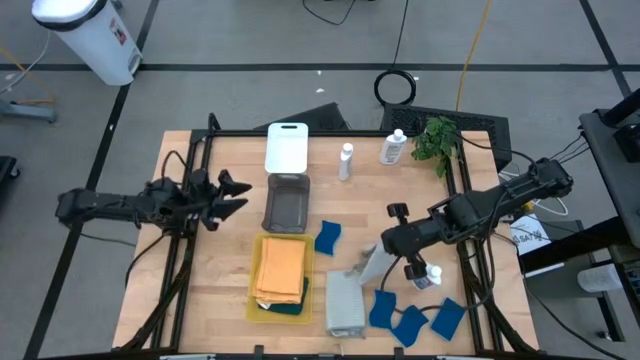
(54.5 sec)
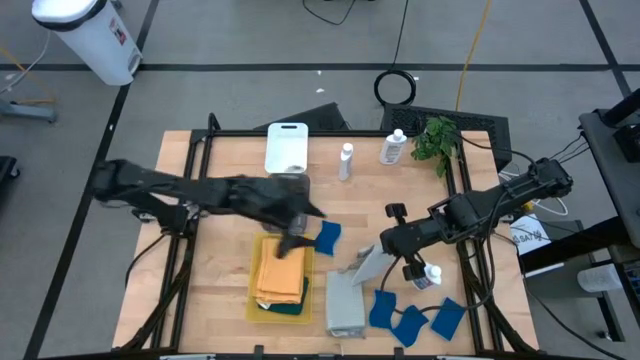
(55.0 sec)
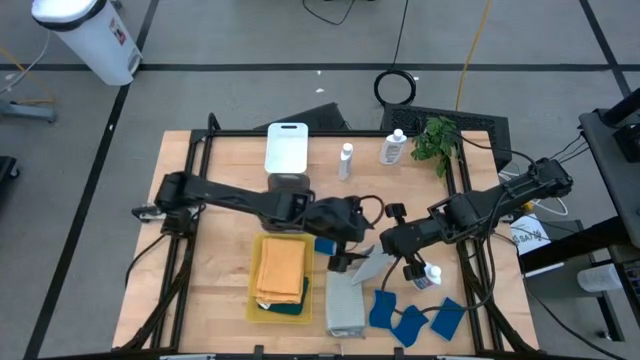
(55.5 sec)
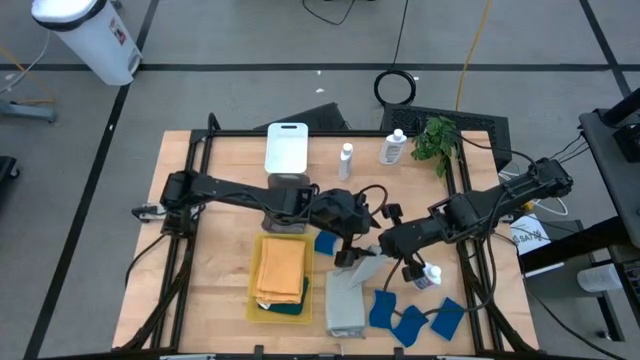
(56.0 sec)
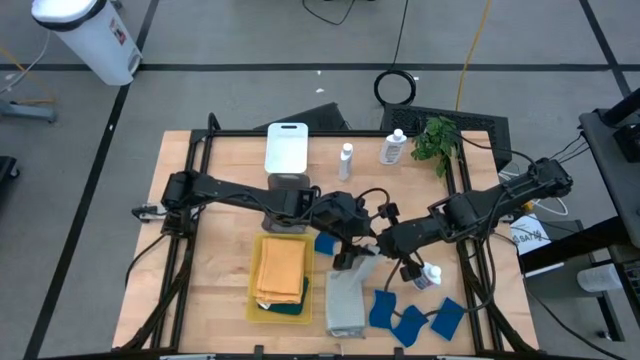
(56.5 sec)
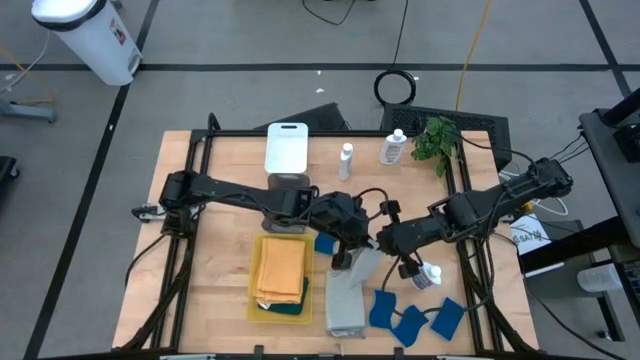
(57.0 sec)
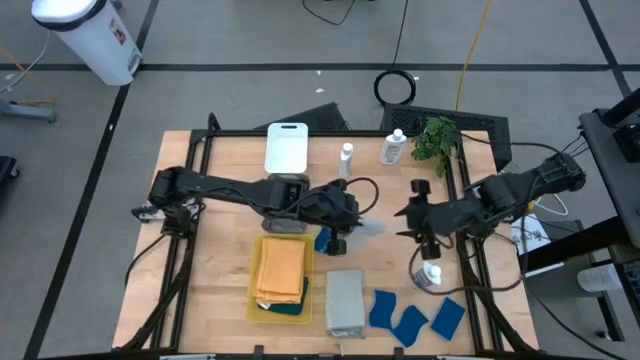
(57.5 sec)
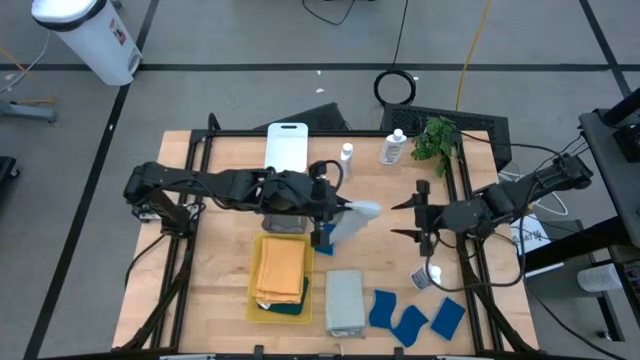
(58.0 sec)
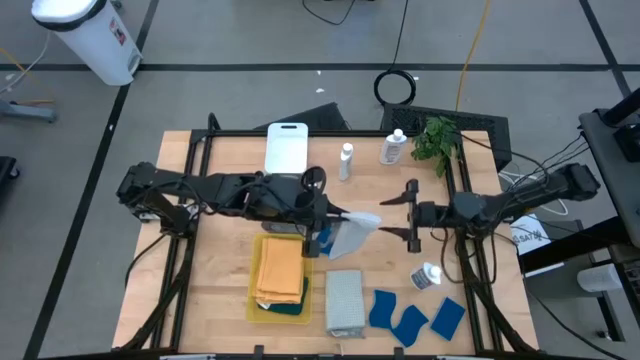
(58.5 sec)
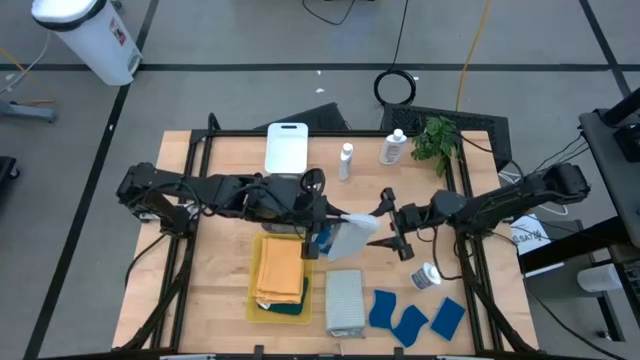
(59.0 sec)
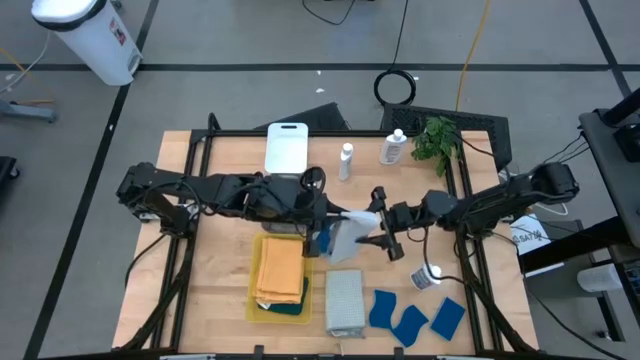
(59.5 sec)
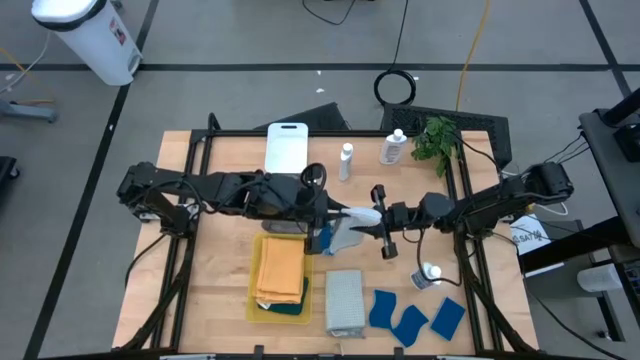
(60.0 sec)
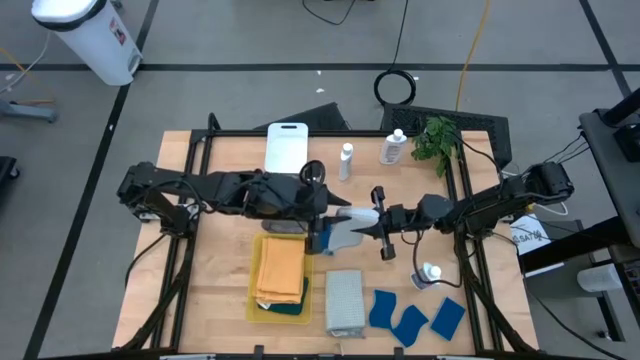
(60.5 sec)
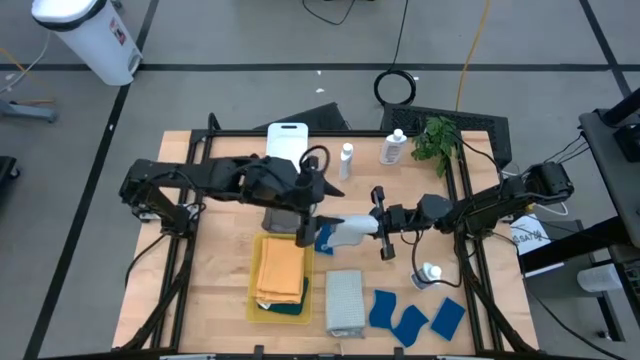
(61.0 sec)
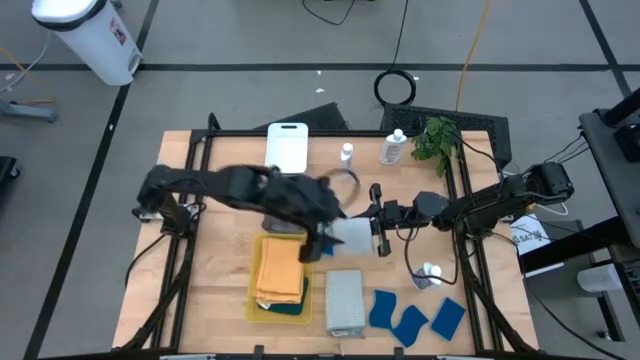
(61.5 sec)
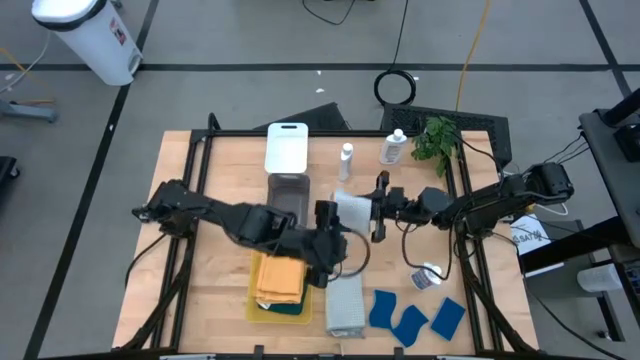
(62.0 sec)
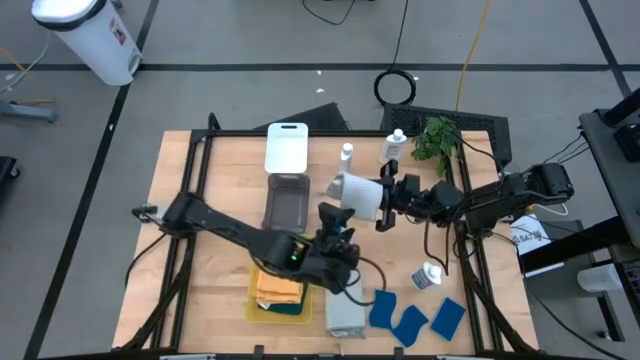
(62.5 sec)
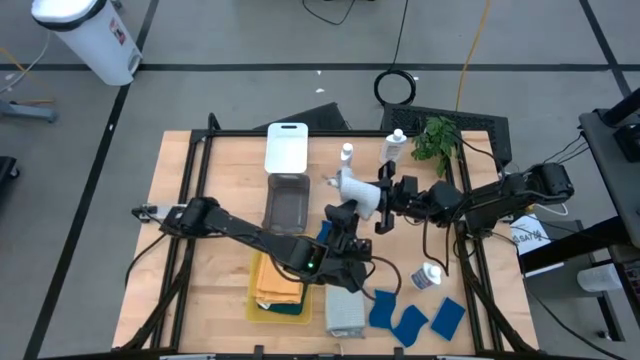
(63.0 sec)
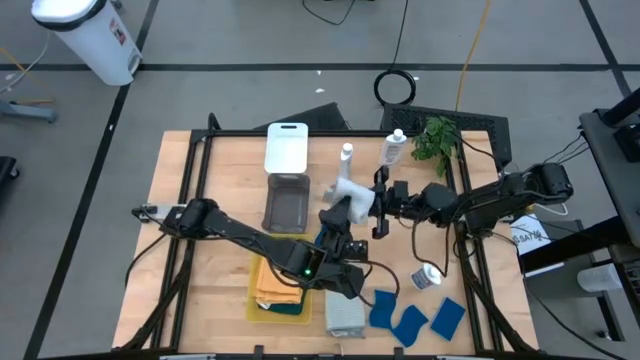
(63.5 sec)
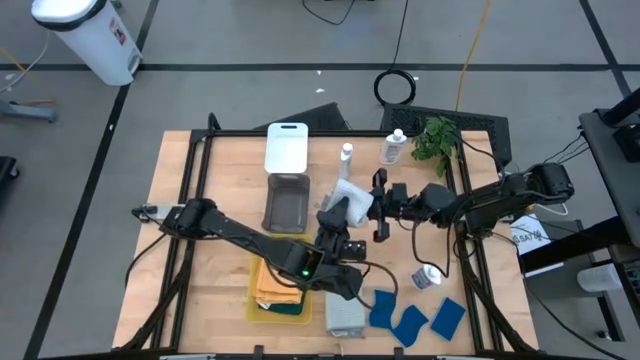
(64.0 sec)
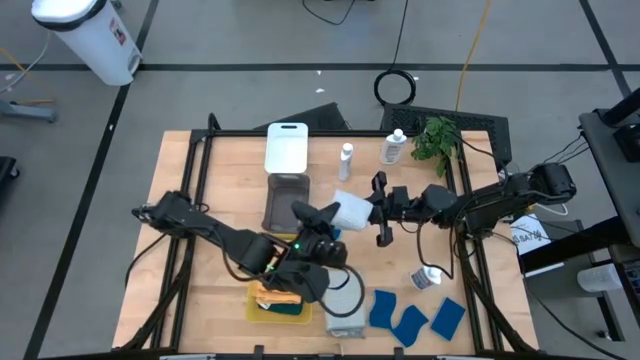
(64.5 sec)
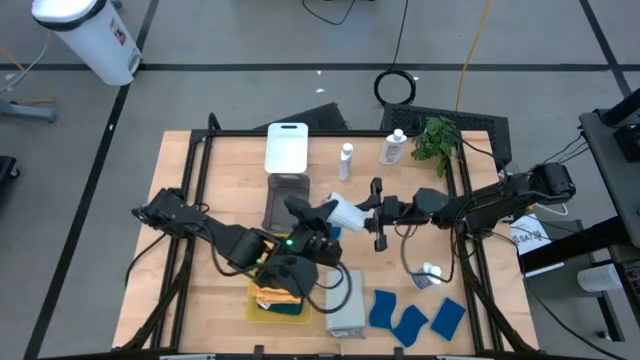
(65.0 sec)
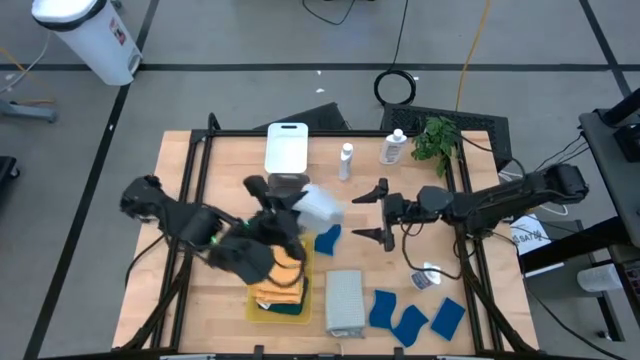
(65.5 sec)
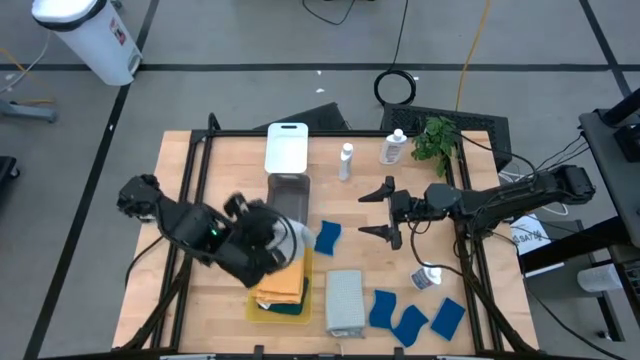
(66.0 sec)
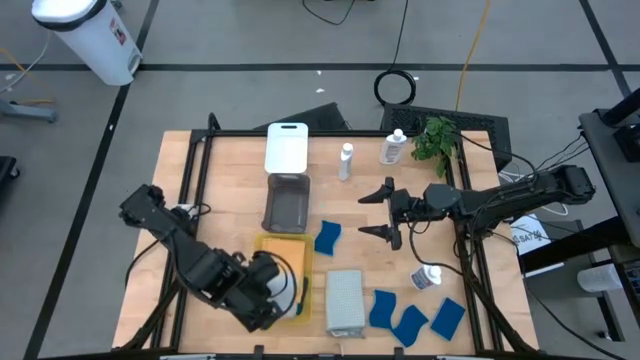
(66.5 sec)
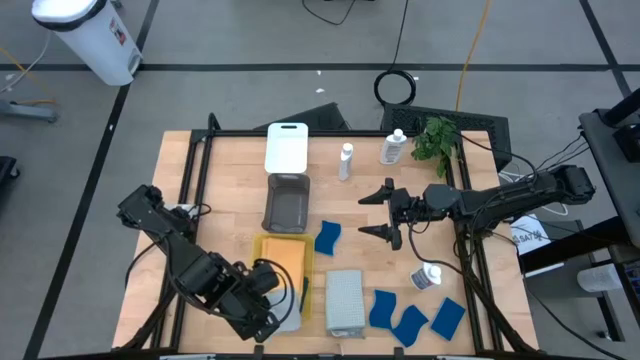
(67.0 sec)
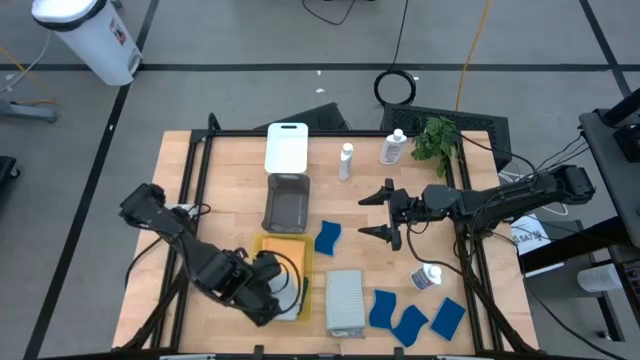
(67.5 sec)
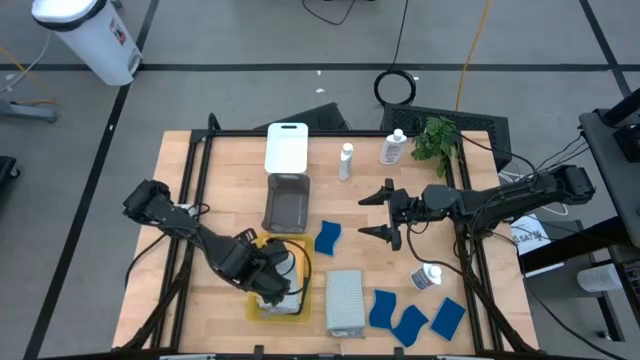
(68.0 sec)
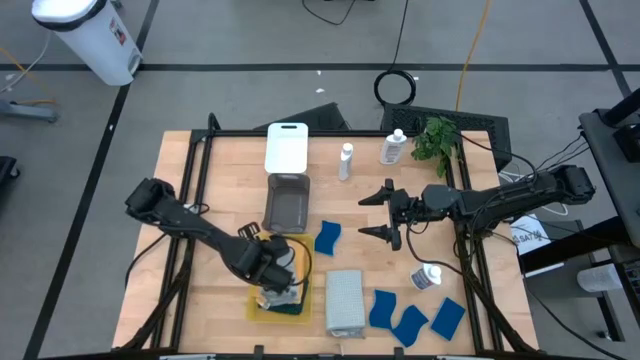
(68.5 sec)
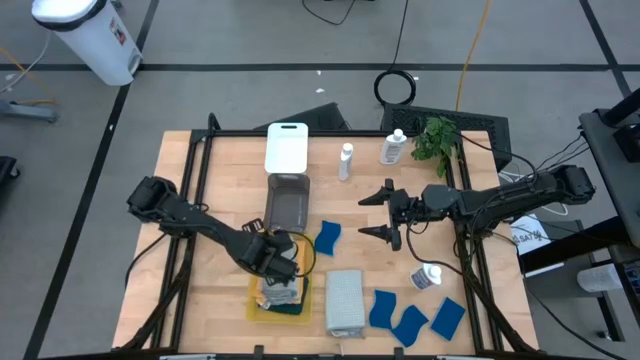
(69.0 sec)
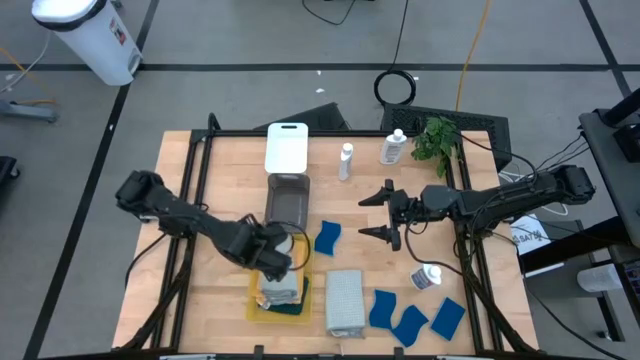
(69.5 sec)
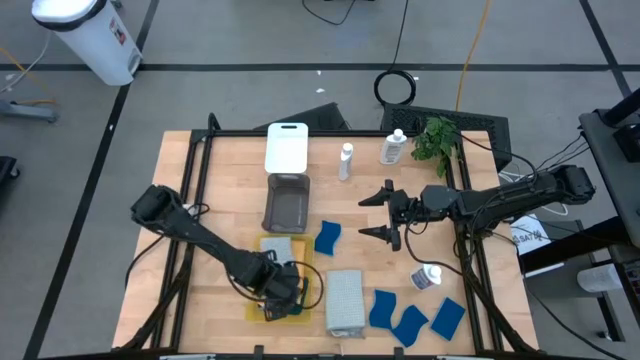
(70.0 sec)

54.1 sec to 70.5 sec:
Task: Pick & Place Kitchen Items
Put the gray towel into the yellow bin

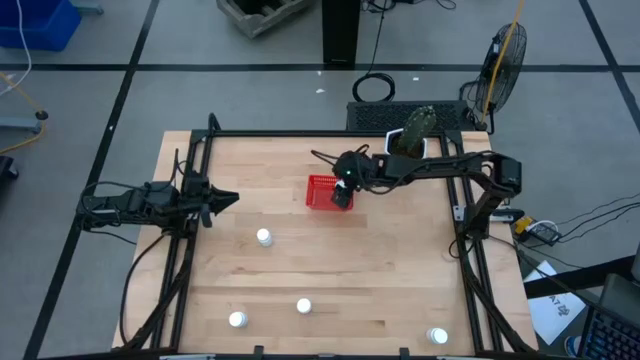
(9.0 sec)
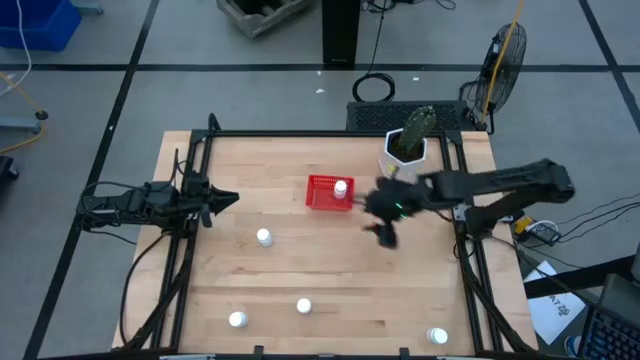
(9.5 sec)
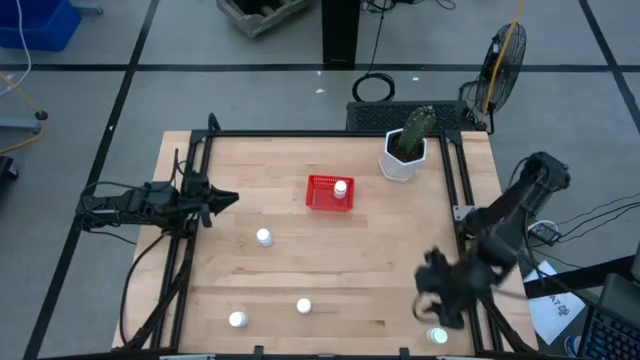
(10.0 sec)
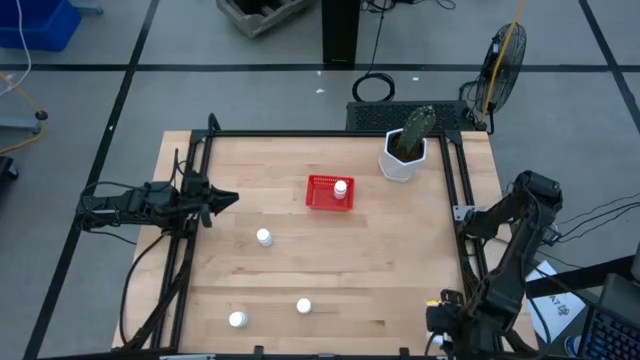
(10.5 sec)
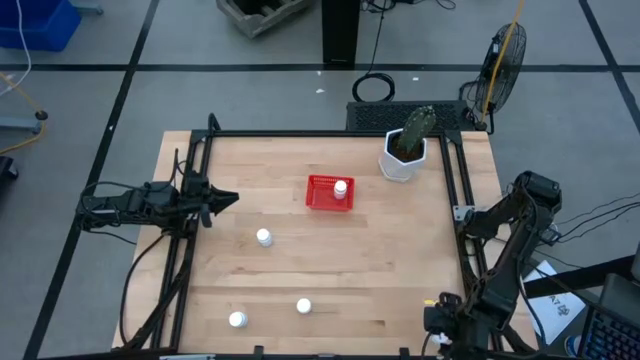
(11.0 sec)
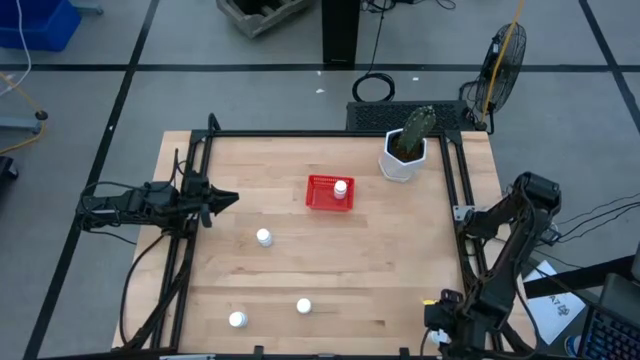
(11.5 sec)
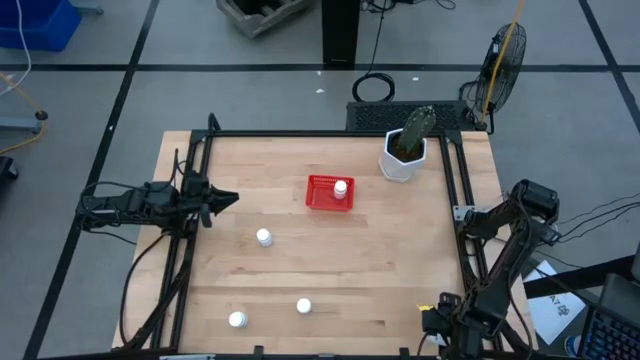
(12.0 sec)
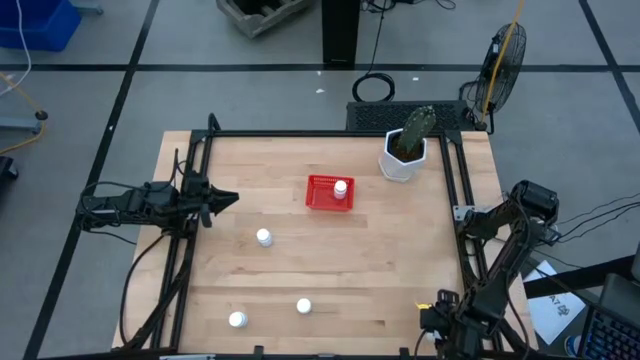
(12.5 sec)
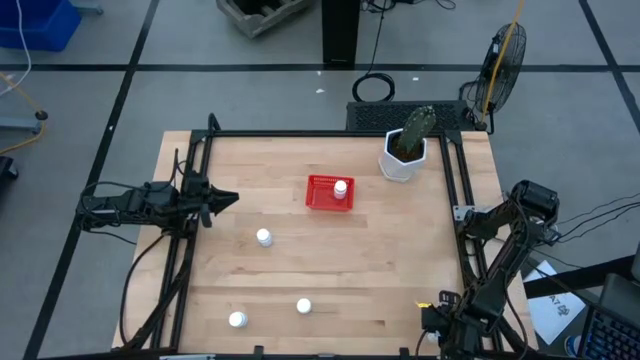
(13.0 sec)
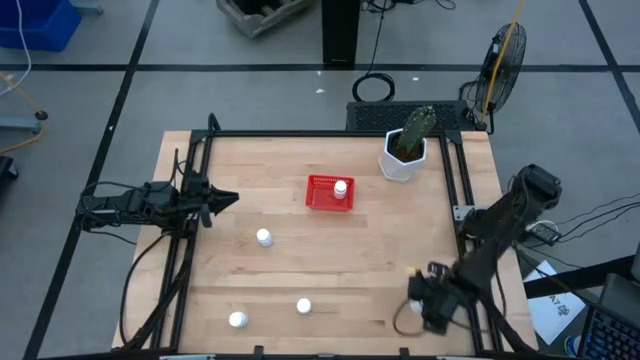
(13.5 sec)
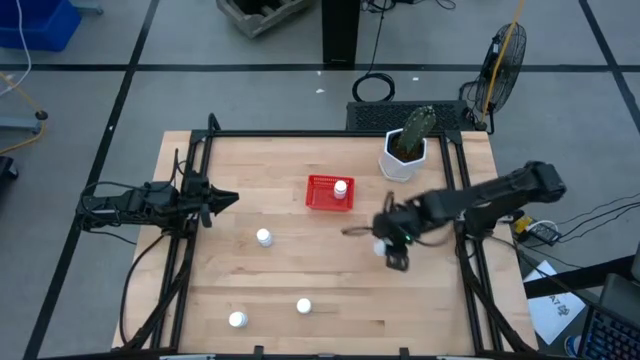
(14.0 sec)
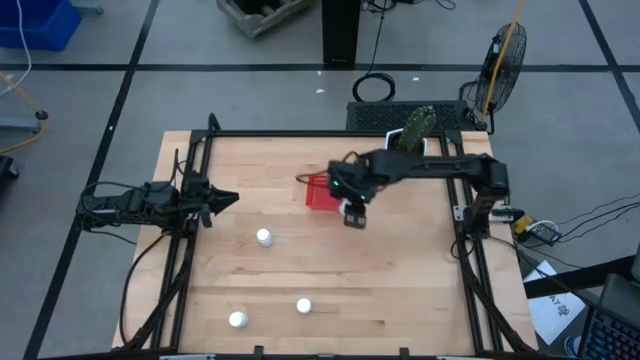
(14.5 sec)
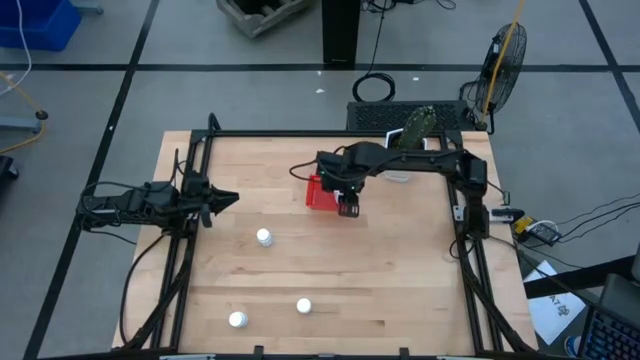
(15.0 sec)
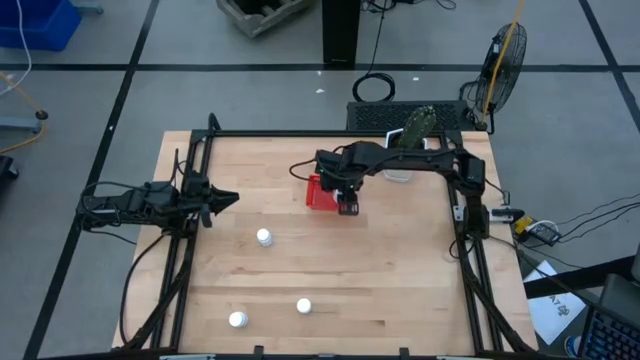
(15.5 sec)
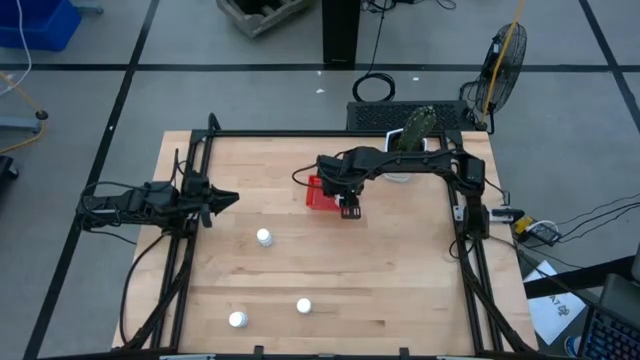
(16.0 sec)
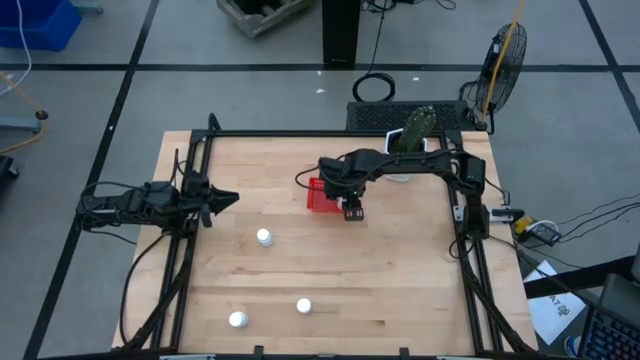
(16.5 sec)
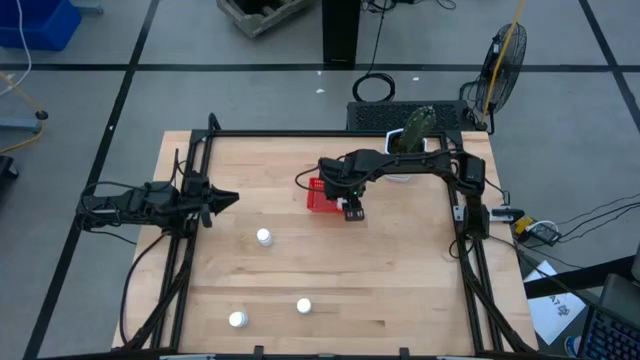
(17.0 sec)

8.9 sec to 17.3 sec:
Task: Pick and place pill bottles into a basket
Put the white medicine bottle into the red basket
